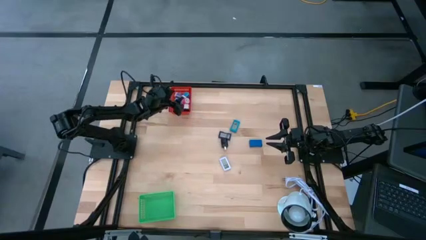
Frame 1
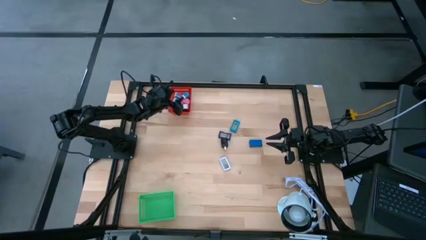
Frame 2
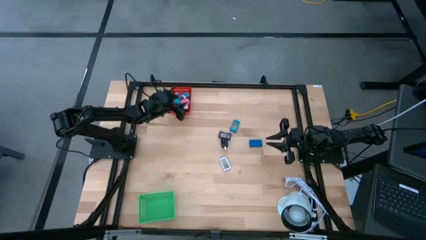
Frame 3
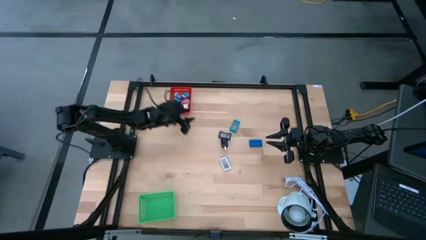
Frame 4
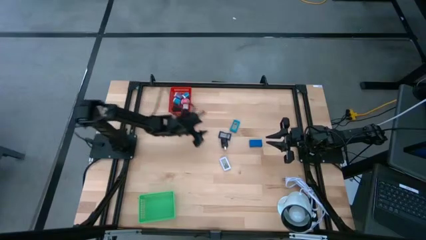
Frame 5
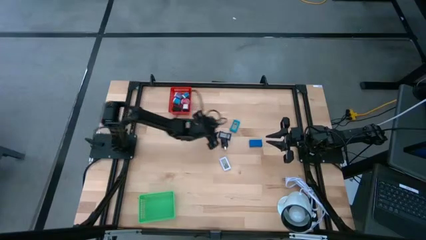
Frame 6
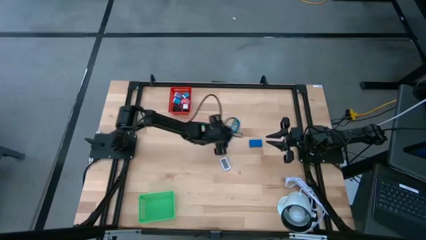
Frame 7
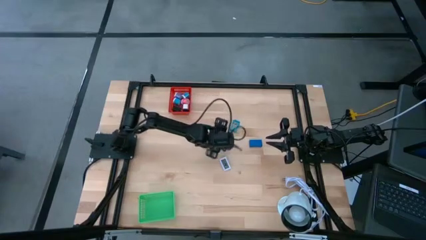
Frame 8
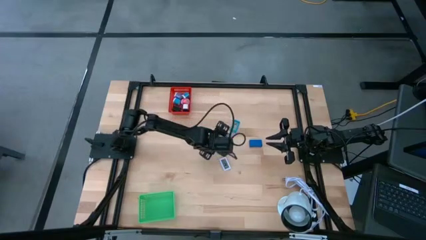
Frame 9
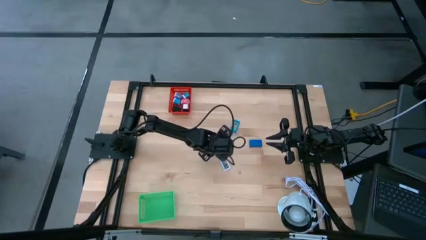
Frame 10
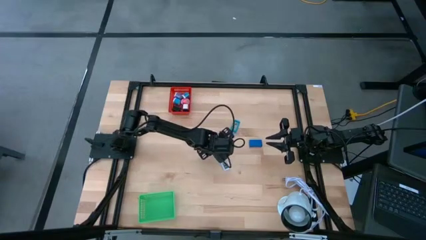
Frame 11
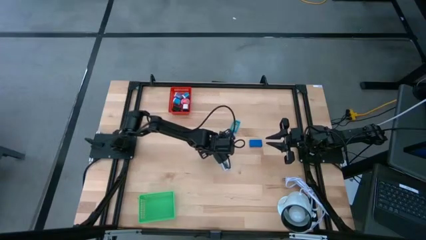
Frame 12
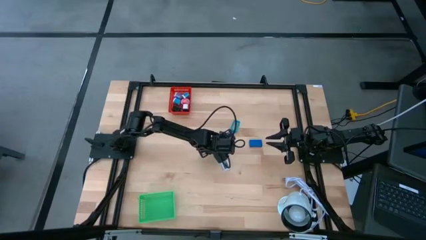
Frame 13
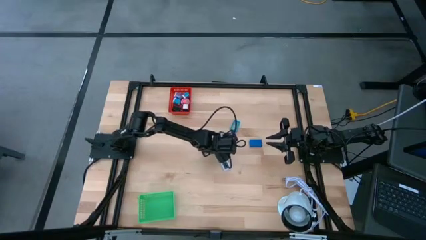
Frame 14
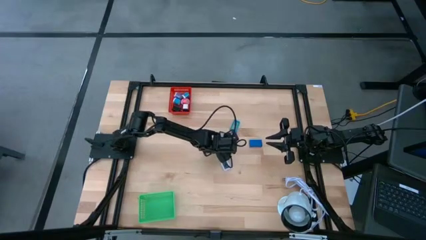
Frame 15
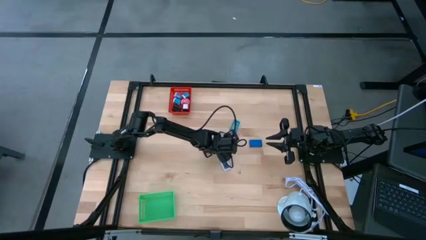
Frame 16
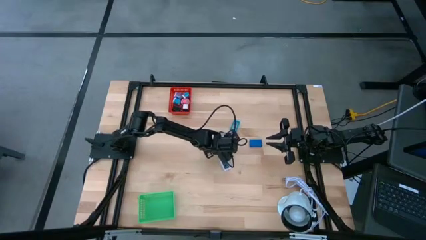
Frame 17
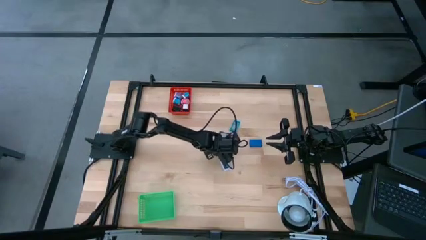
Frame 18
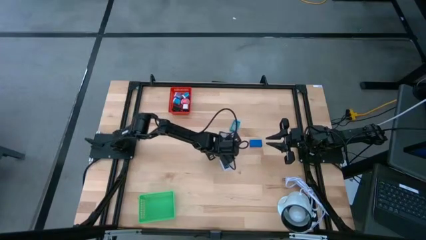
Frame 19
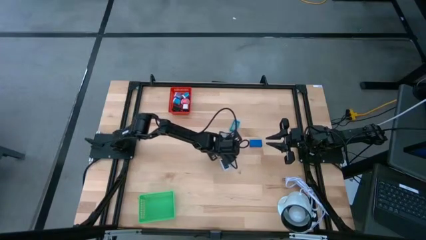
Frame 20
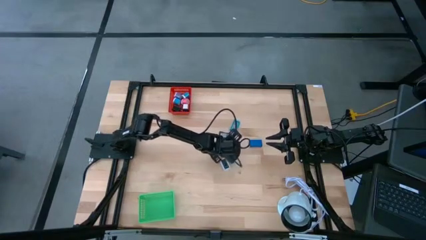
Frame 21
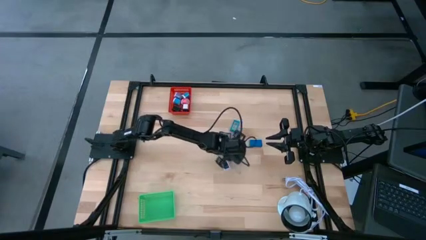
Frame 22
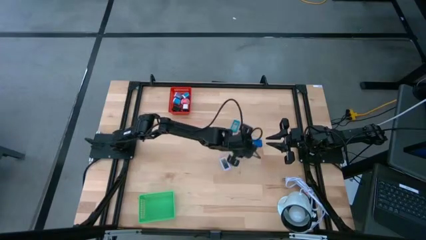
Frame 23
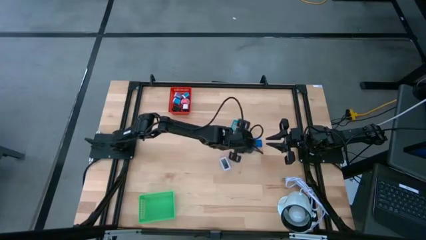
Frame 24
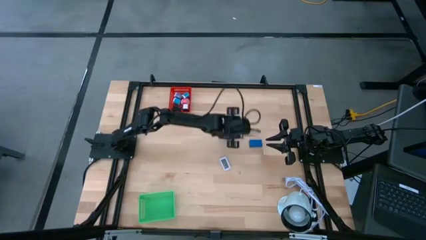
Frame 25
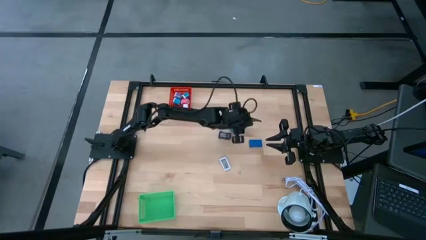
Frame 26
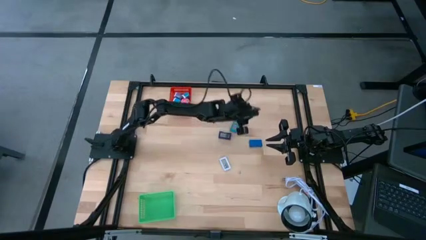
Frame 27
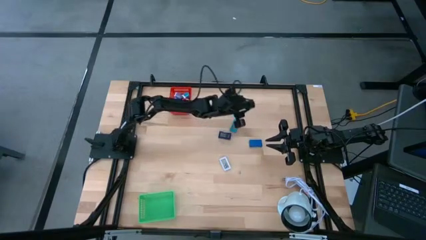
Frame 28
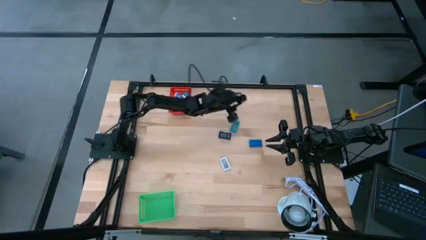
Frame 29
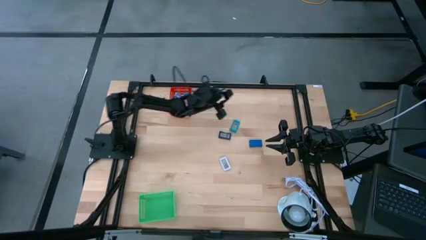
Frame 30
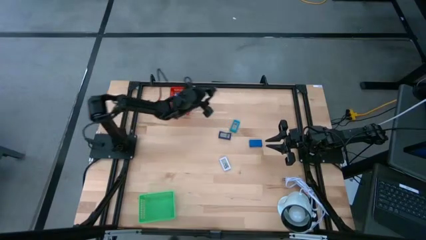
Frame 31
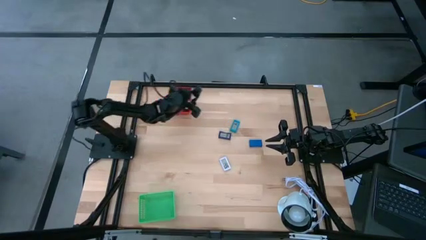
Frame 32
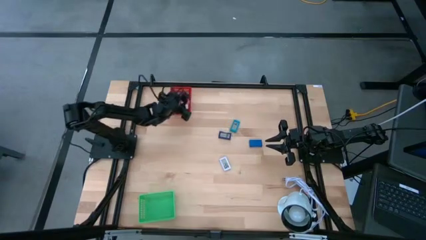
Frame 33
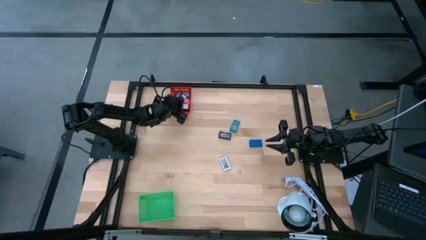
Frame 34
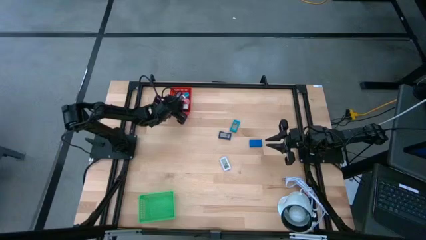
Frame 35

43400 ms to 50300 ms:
Task: Pick & Place Office items
Put the black charger adapter into the red bin

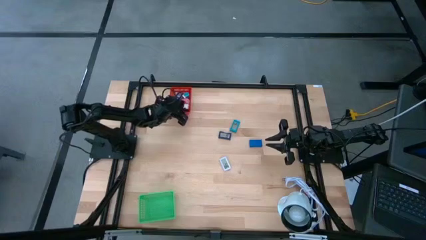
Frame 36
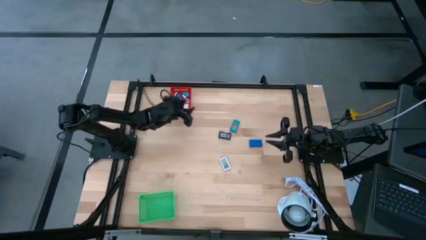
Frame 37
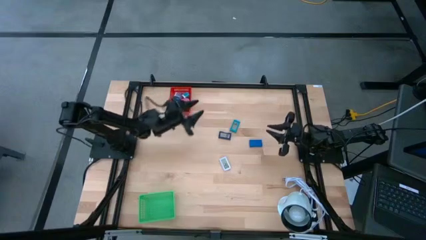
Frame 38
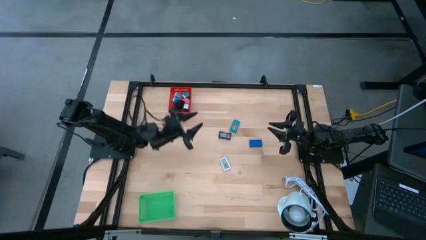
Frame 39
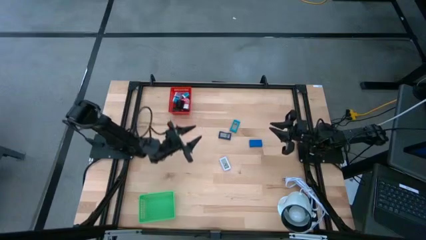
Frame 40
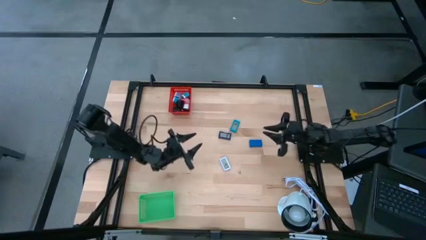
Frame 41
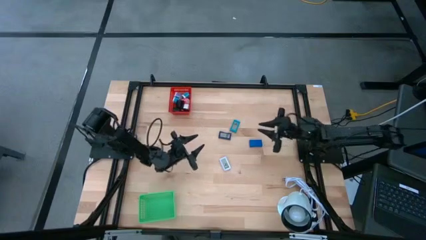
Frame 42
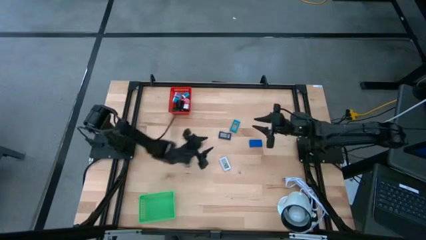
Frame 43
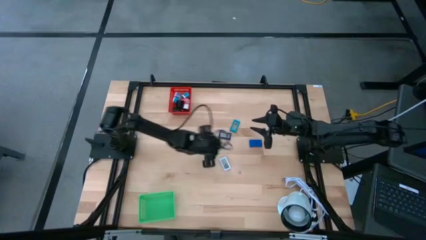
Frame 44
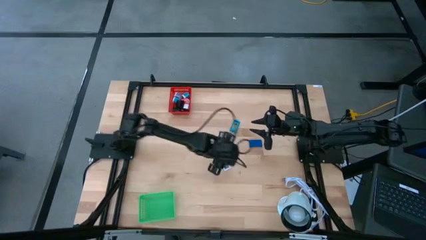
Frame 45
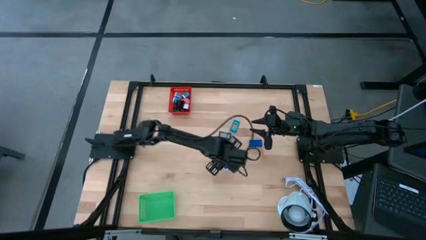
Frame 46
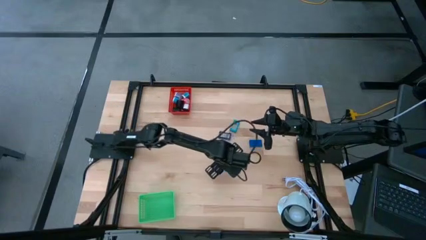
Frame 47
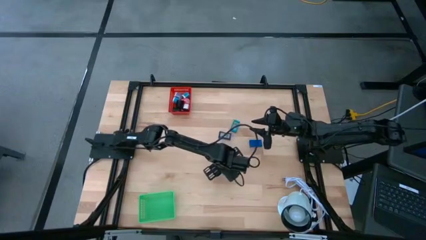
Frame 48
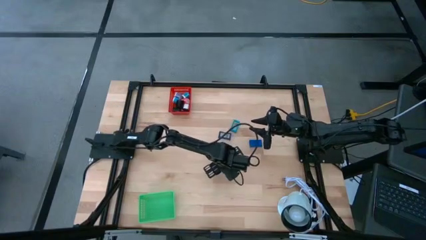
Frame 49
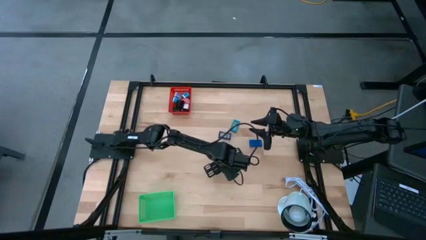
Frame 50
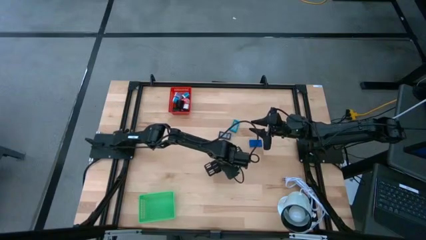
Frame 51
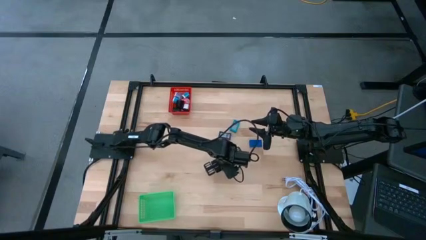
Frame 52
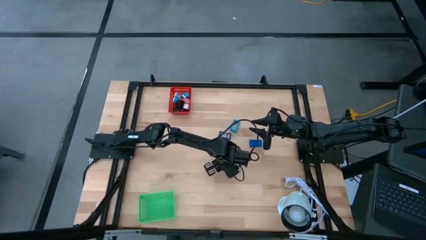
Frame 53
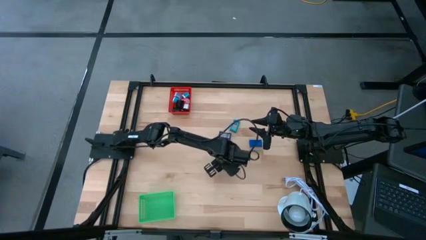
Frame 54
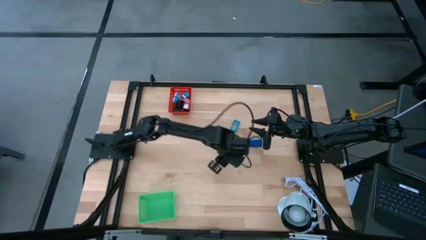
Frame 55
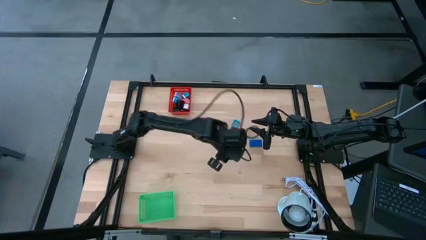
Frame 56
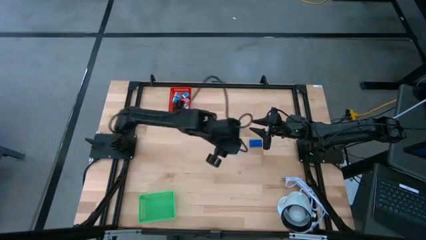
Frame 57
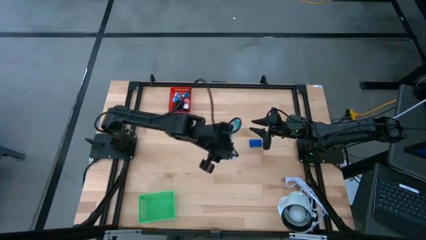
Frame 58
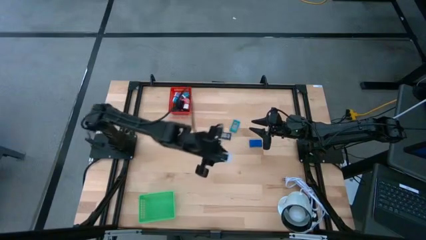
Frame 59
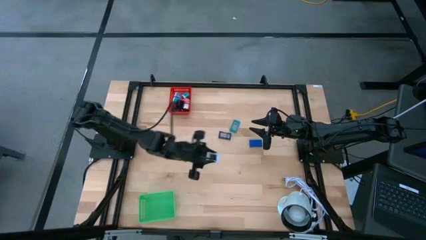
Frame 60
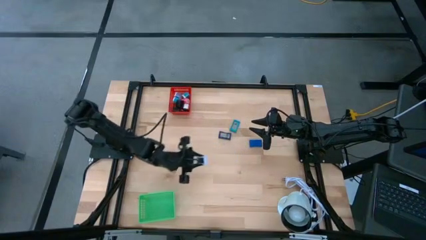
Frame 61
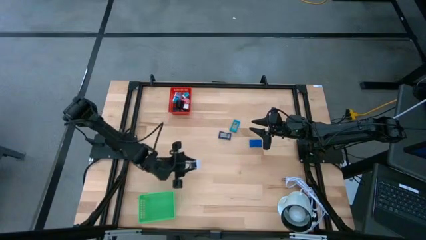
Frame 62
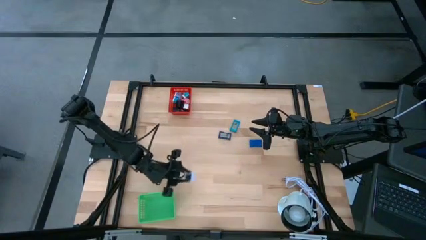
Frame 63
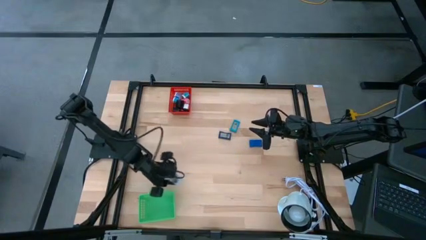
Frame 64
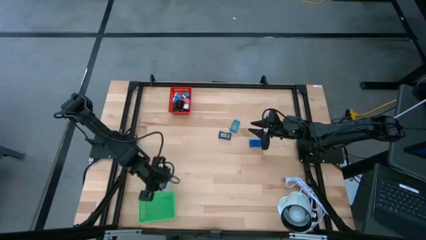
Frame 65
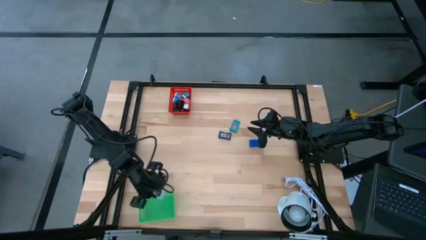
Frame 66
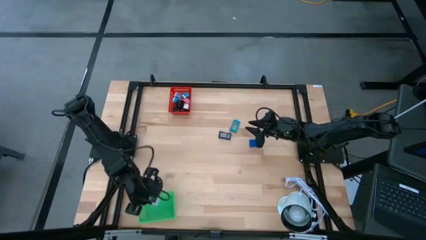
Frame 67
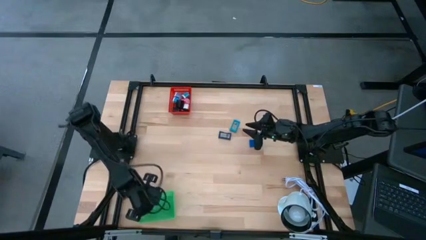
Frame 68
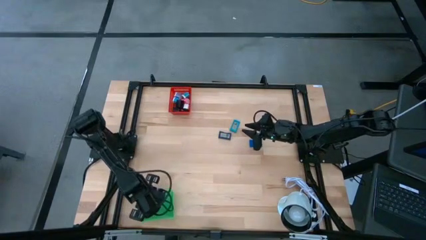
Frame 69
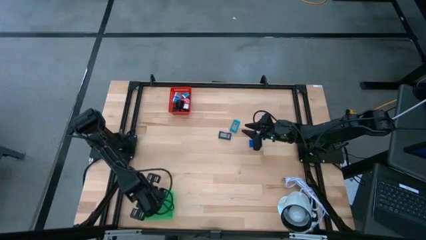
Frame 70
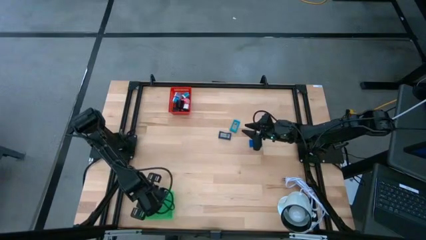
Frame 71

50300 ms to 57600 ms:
Put the white digital clock into the green bin
